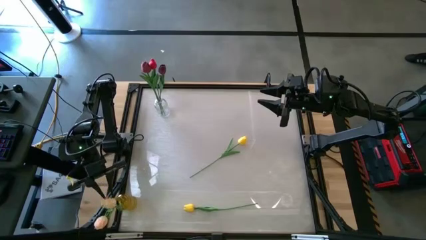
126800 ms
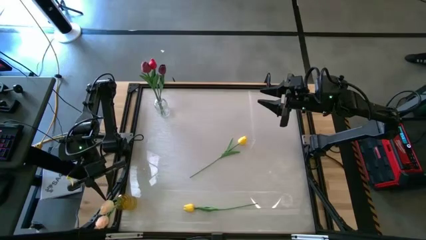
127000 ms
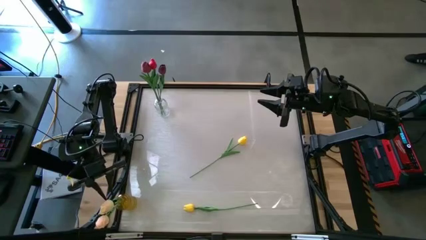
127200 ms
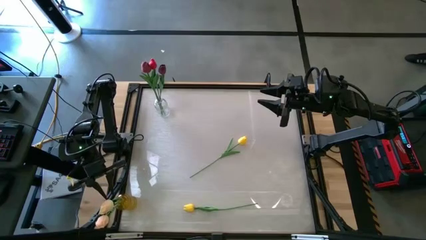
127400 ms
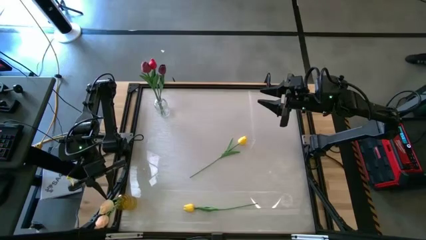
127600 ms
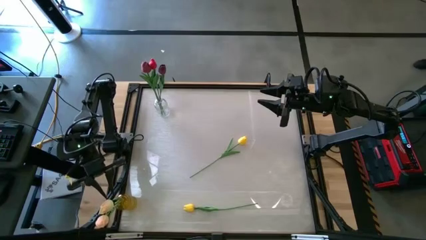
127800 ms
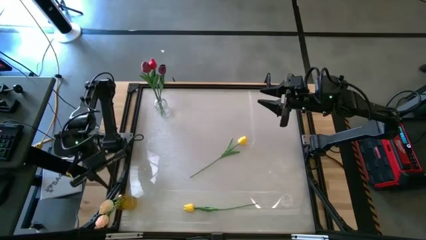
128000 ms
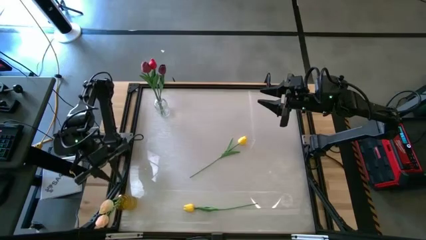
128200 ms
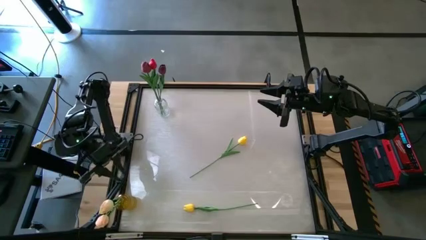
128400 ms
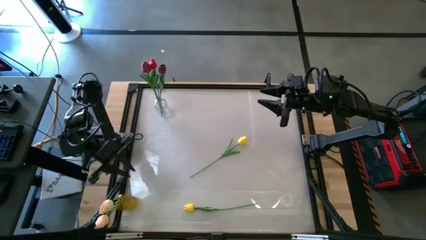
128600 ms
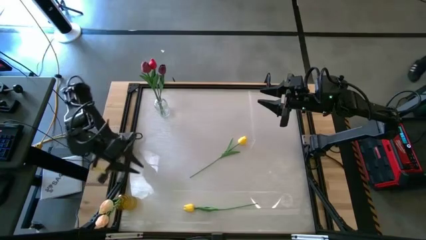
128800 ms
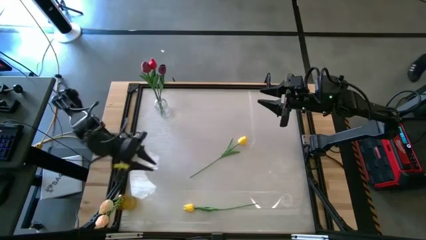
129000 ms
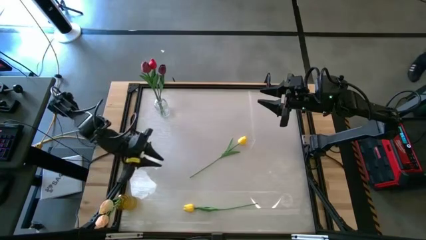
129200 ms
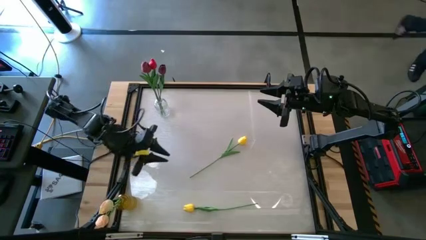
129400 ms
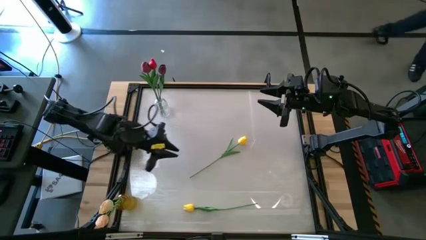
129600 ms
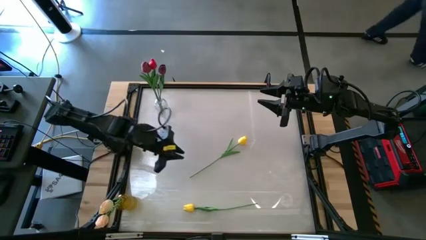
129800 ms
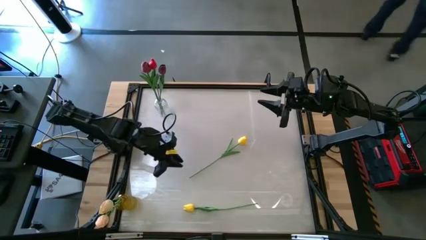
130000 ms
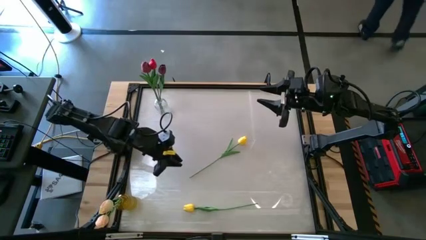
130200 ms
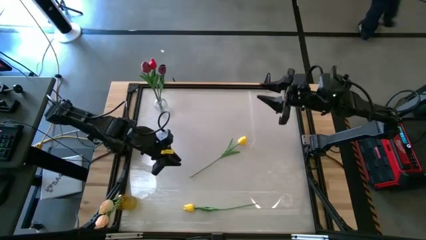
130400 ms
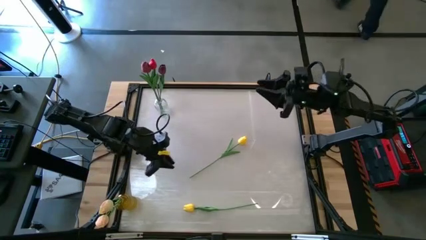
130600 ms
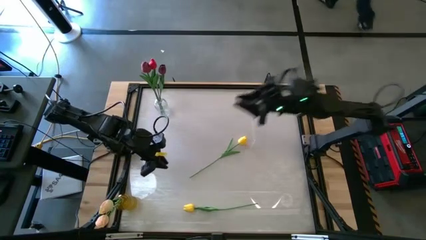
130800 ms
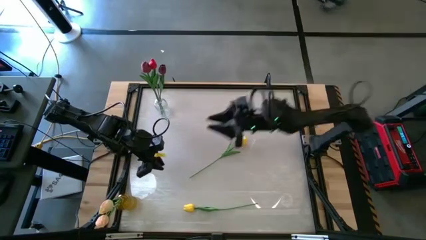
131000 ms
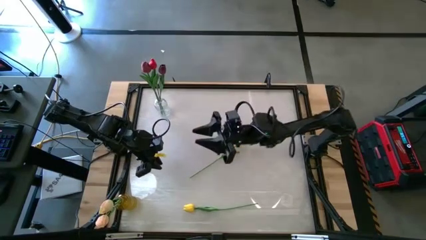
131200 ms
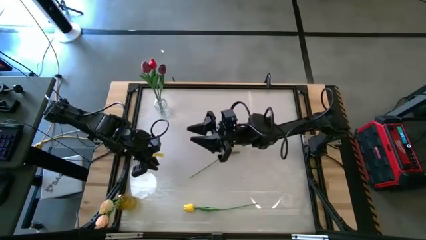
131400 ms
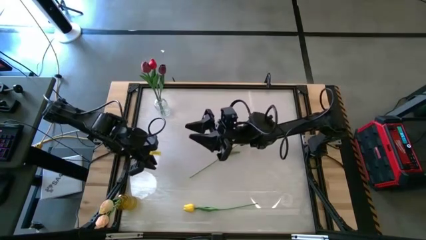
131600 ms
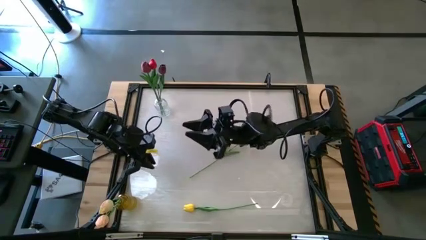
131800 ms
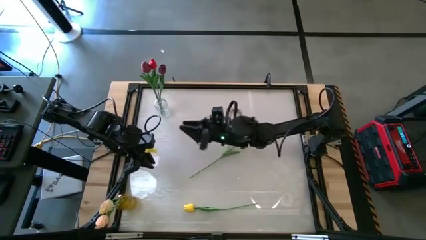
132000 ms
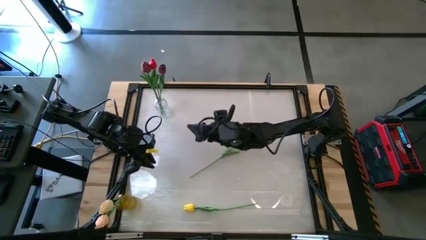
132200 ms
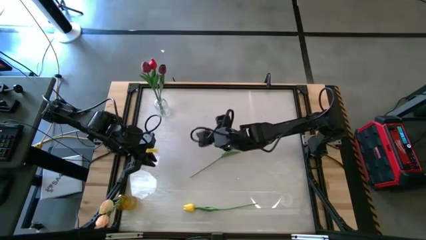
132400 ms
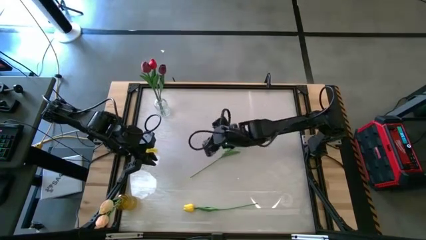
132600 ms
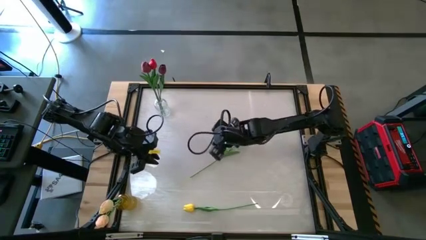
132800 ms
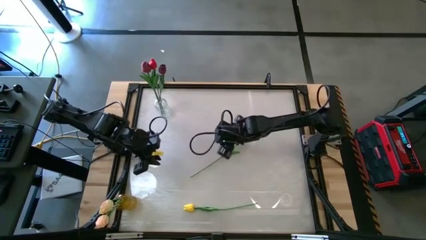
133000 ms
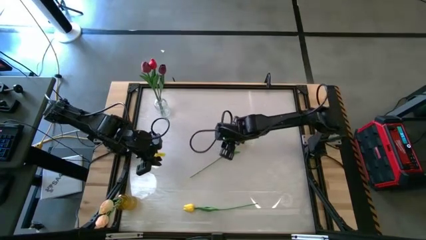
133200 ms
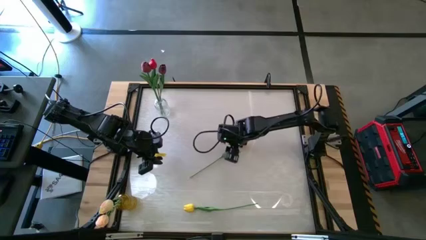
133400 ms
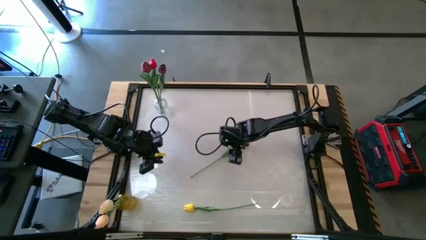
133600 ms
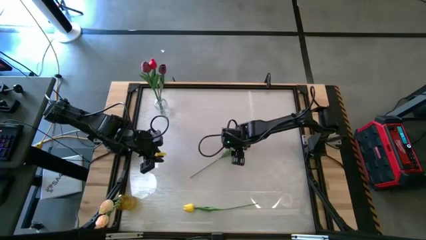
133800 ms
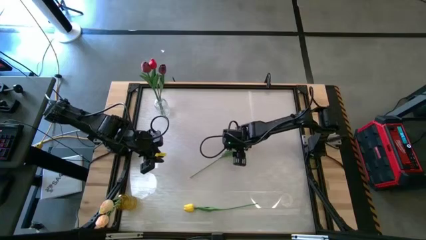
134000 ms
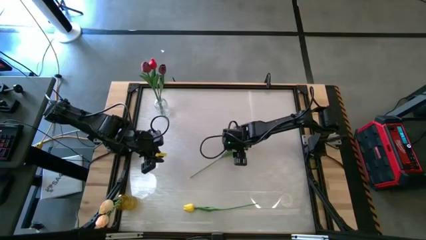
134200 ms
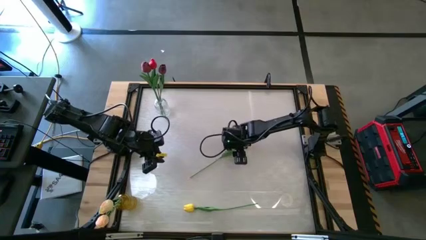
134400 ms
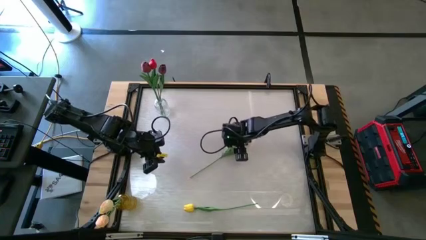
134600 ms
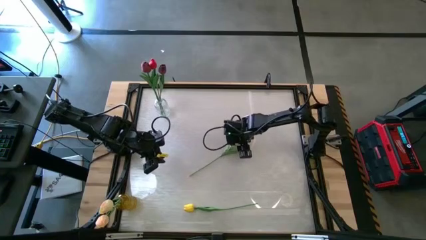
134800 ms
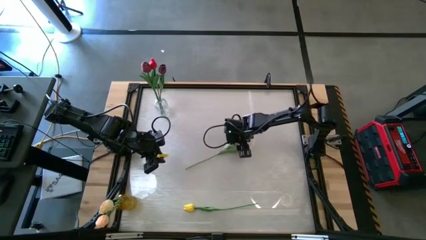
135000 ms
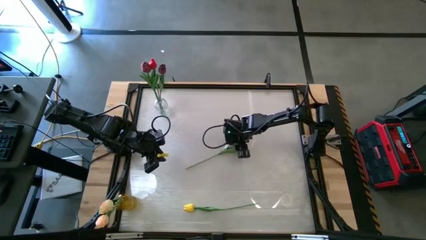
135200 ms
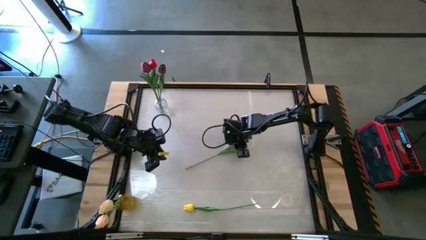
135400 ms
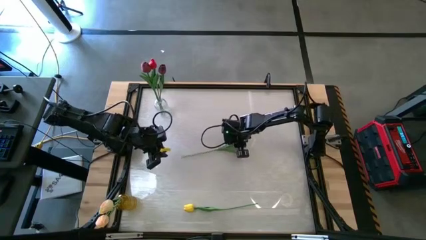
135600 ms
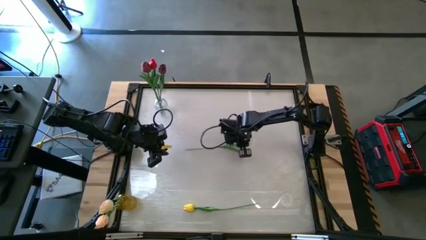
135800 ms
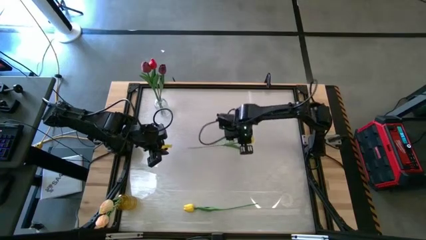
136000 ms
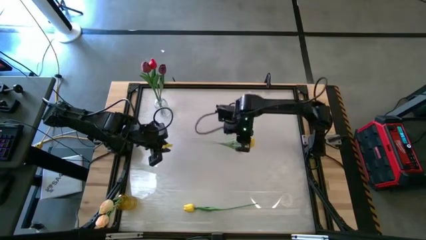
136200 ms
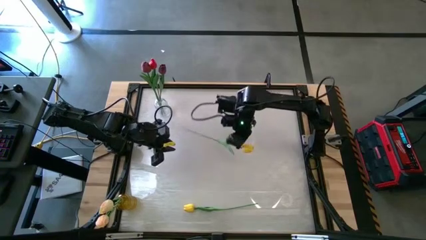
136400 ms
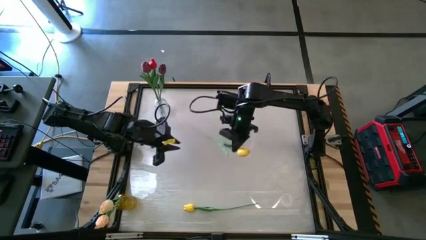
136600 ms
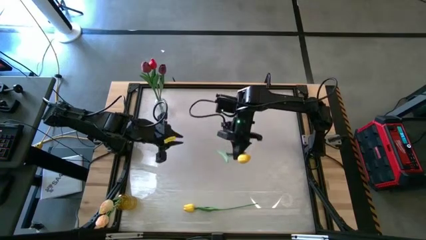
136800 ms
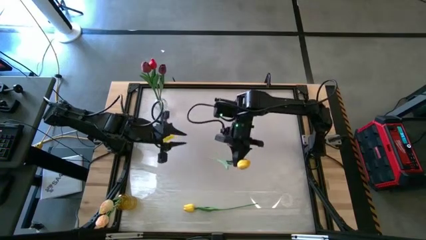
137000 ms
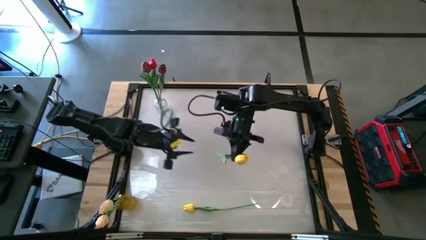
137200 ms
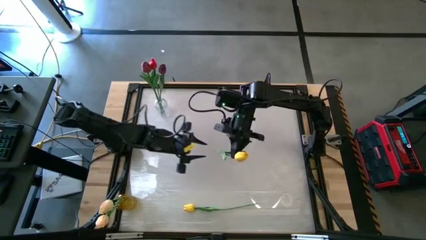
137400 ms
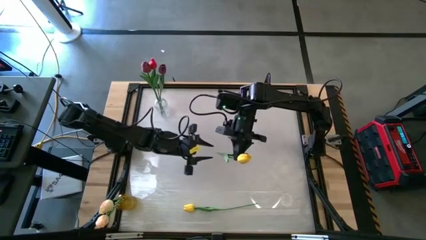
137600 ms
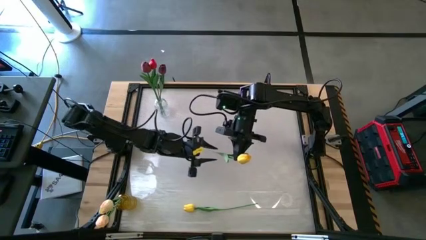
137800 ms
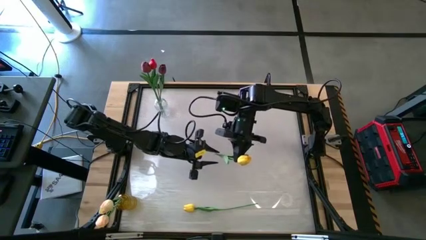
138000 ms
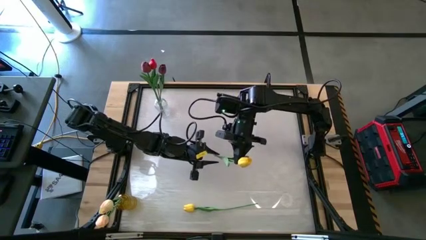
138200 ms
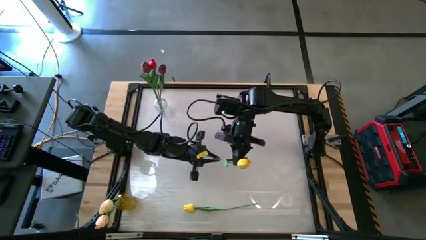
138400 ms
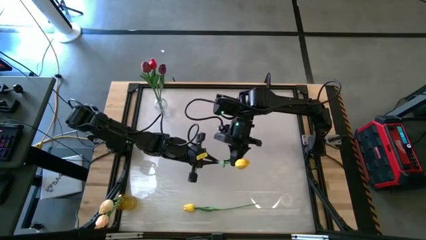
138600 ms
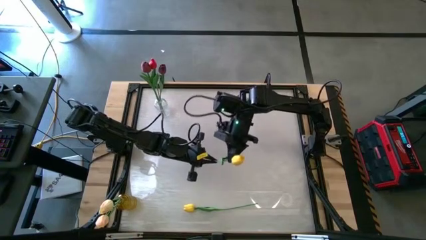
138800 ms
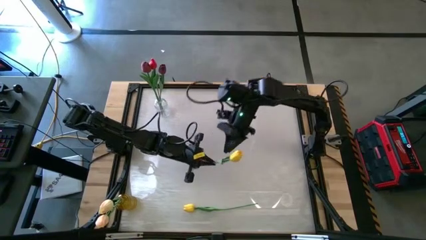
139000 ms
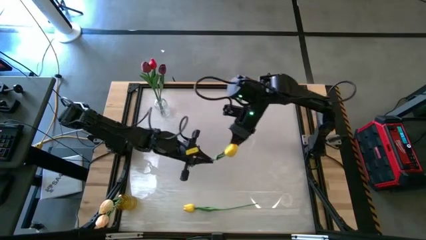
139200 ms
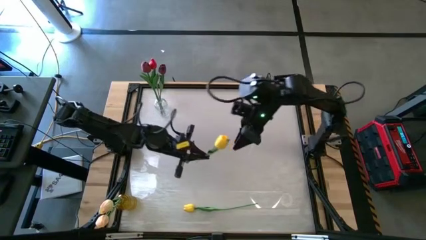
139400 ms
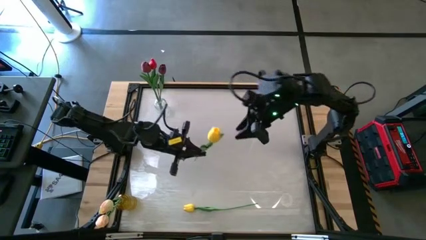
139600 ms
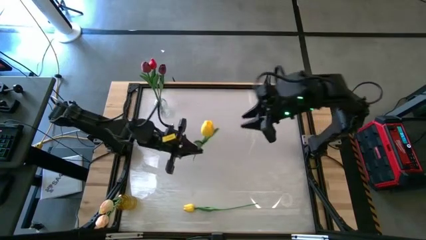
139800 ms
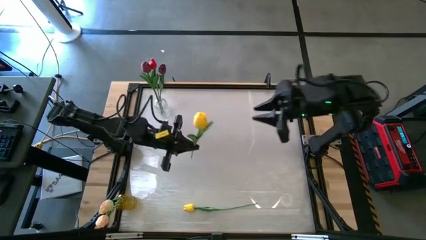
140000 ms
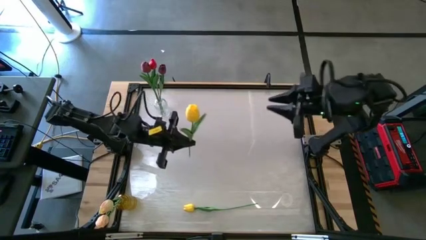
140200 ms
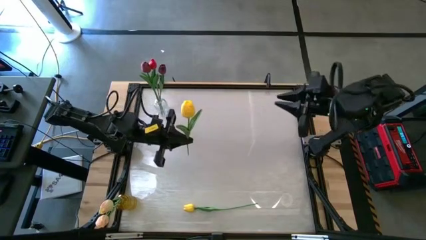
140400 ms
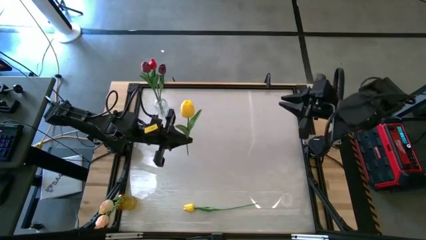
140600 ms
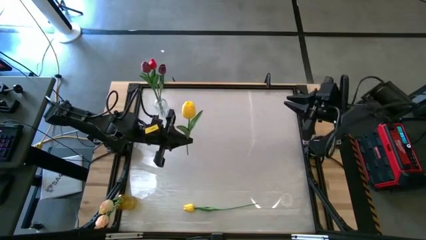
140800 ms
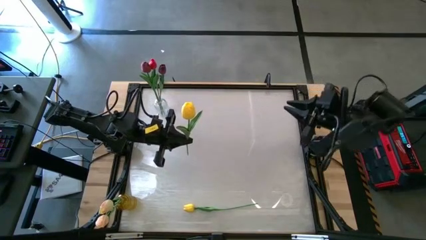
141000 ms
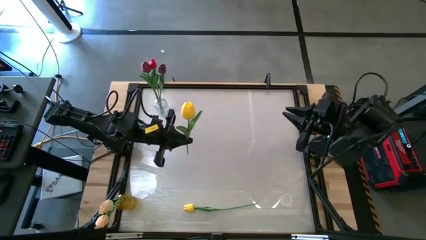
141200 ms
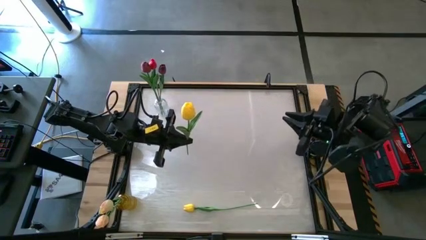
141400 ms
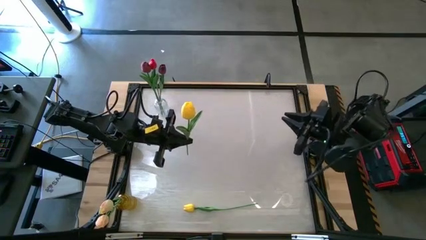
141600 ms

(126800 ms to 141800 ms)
Task: Sort flowers into vase by color
Put the top yellow flower into the yellow vase
